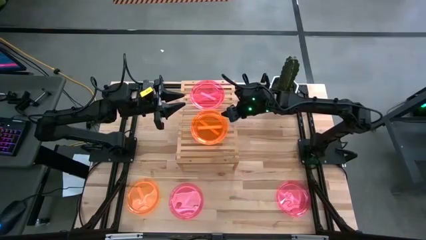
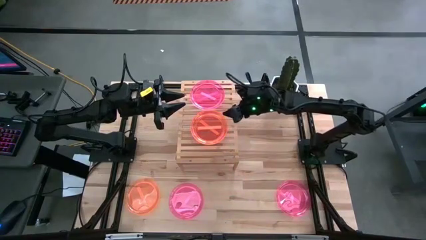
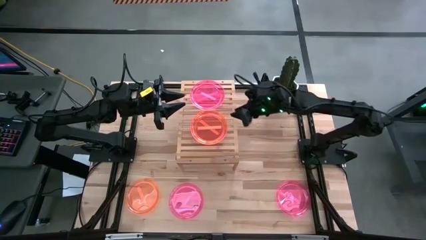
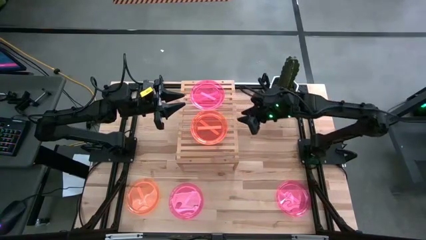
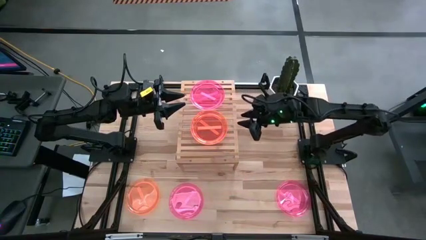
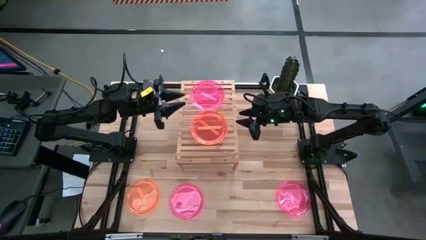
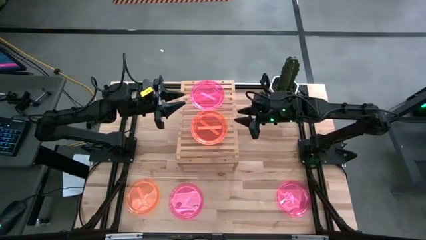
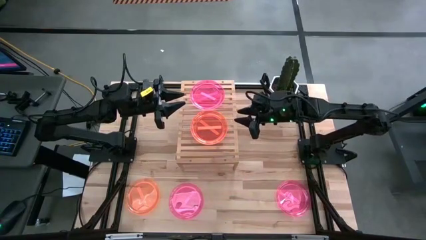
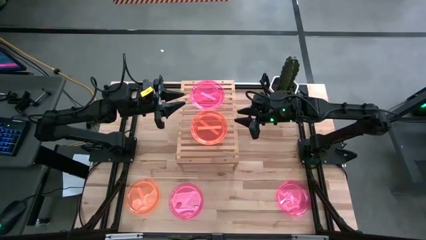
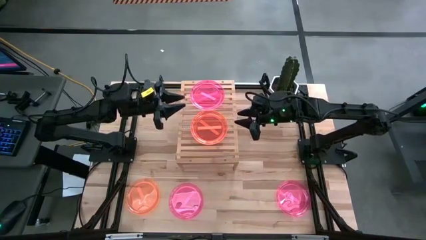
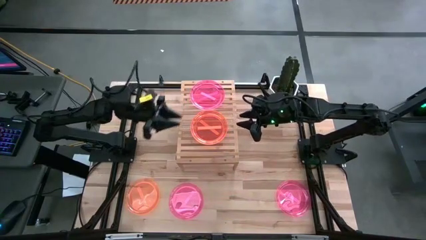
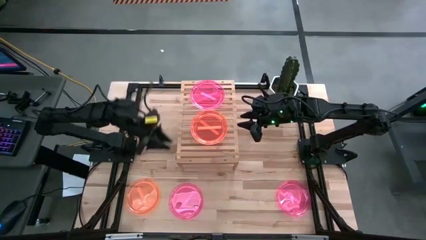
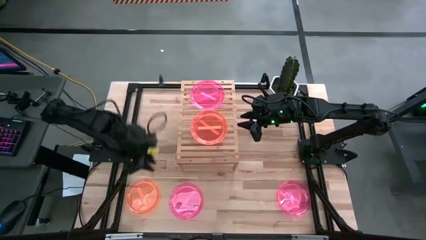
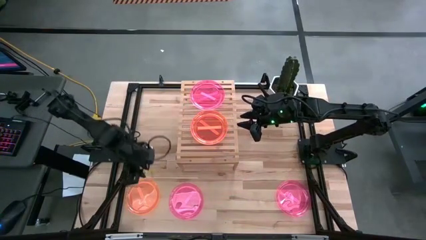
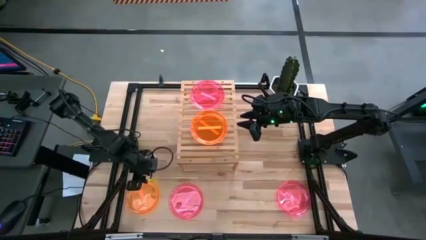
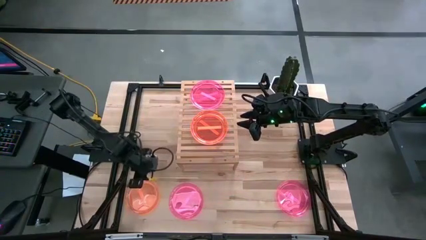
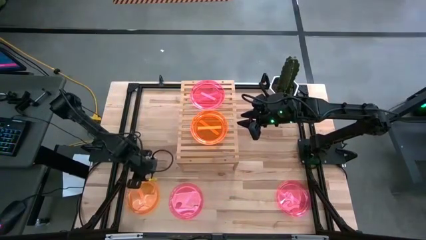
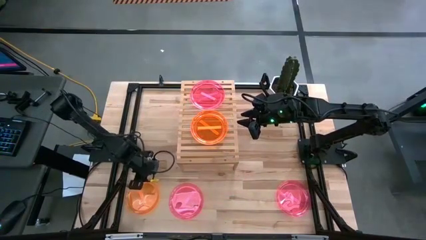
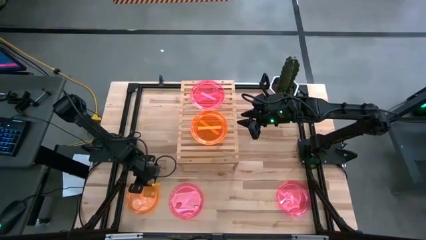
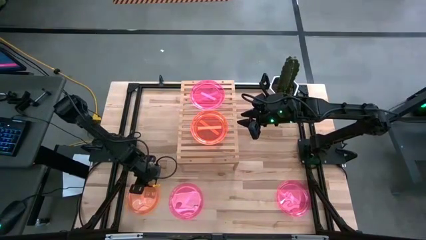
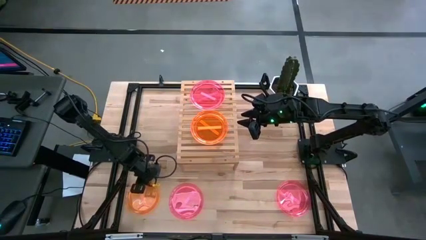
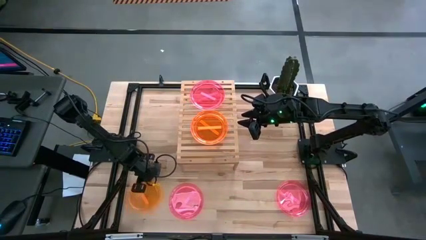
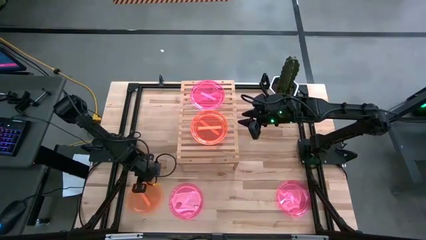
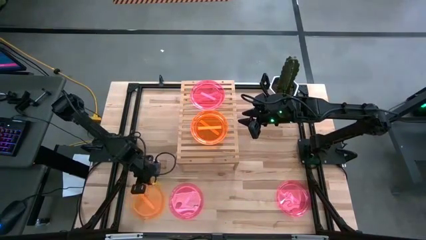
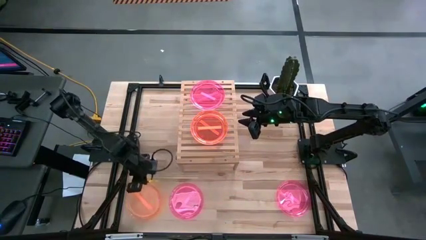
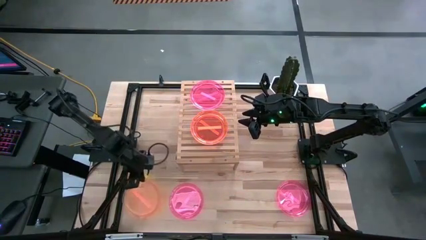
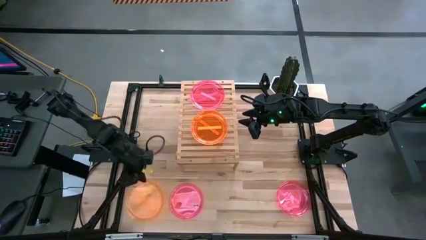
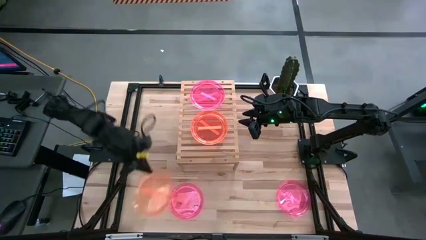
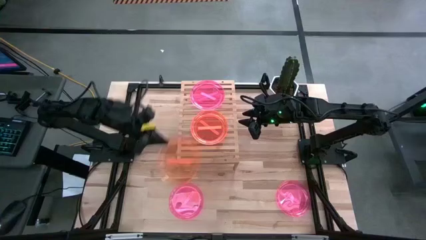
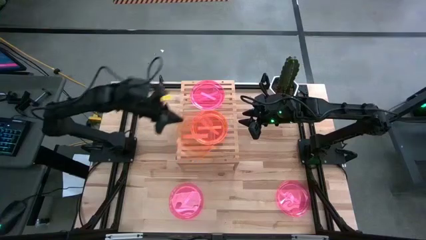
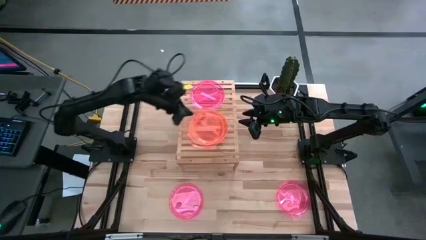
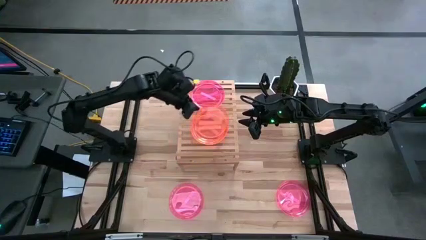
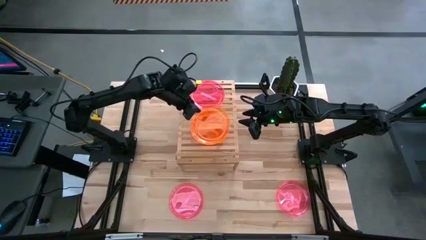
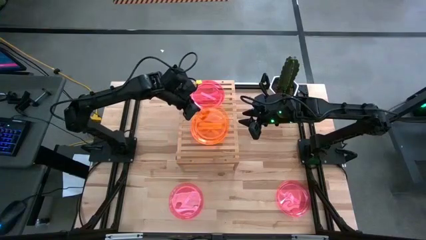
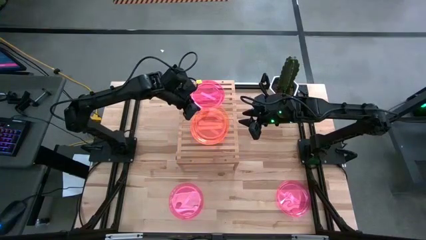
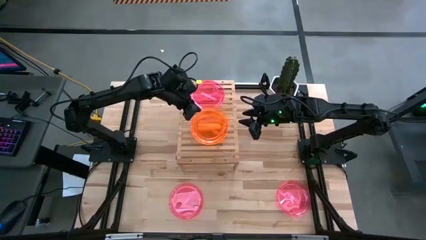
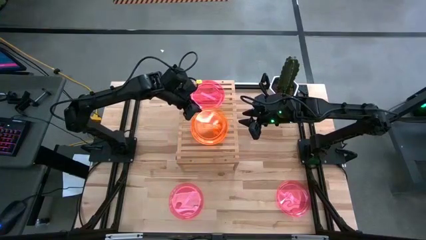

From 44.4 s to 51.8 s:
Task: Place and stack plates onto a shelf
Stack the orange plate on top of the other orange plate on the shelf

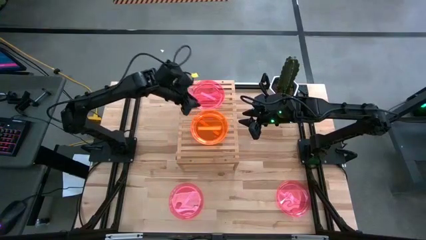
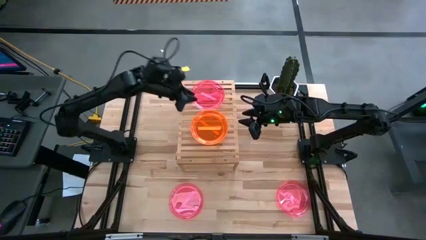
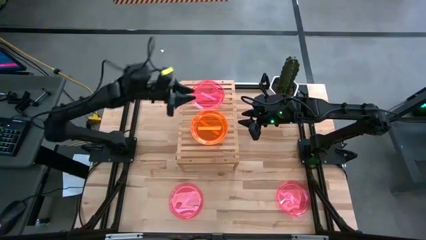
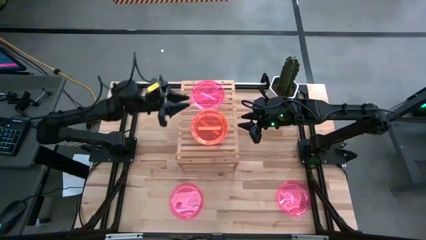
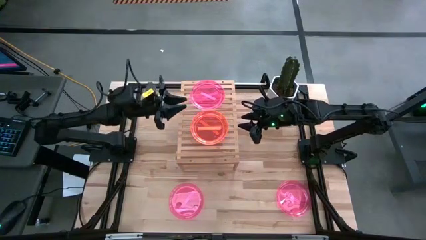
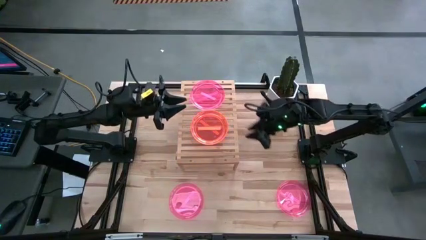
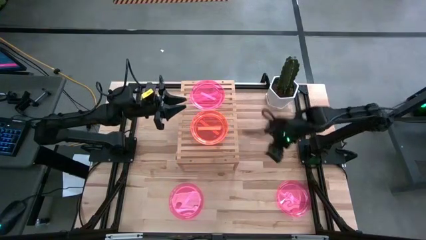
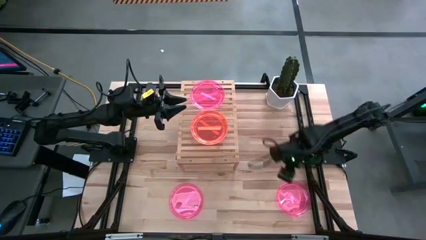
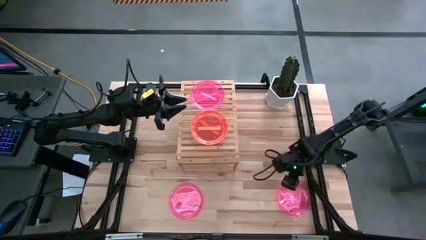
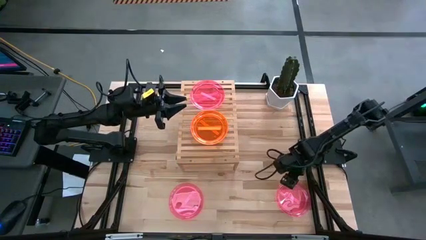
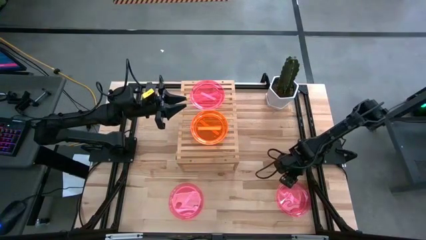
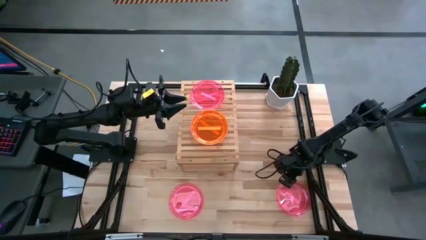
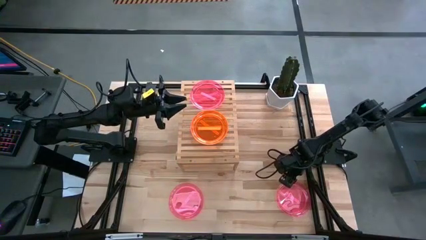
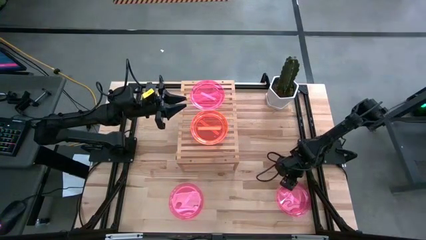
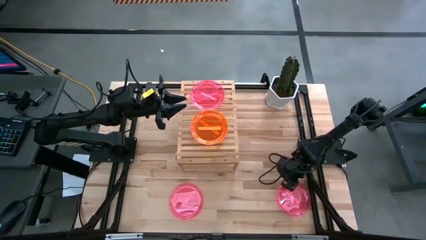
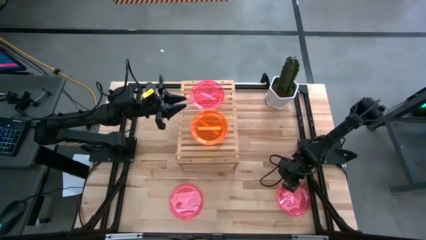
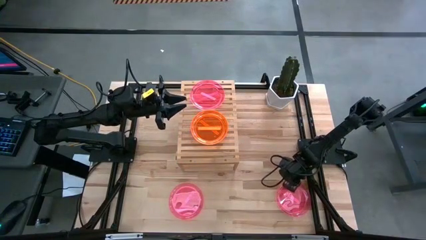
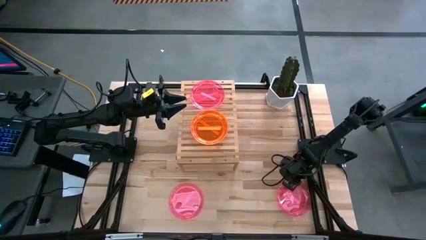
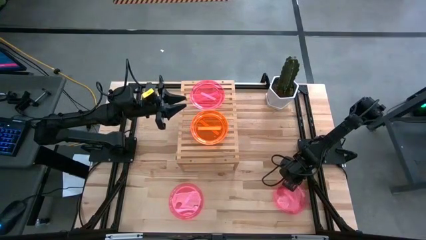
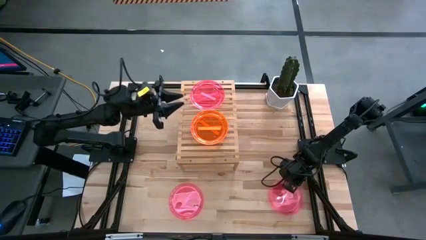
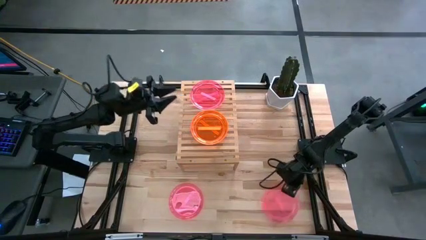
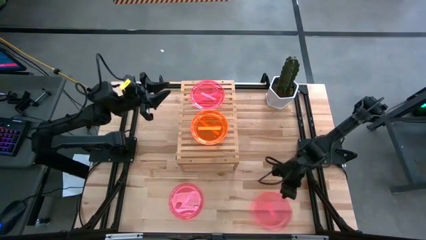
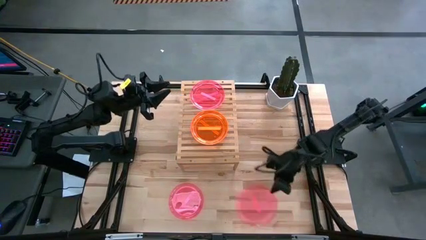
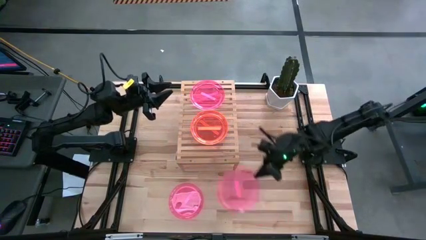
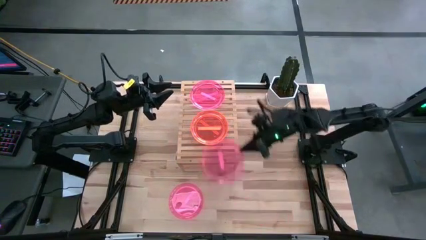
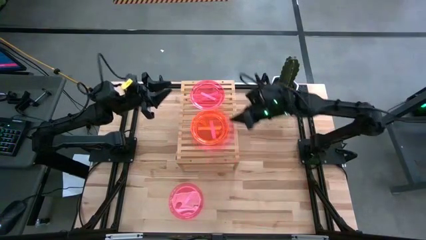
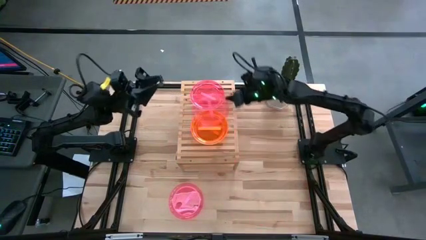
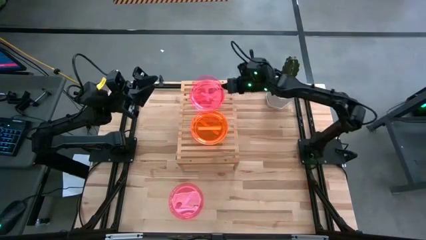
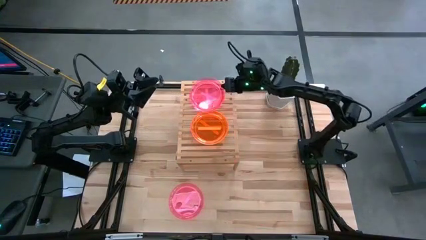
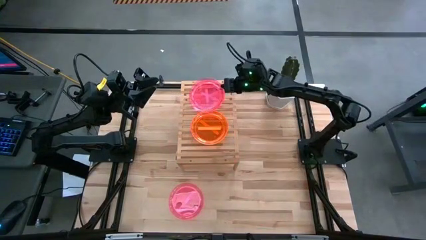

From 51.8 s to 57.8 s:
Stack the pink plate on top of the other pink plate on the shelf

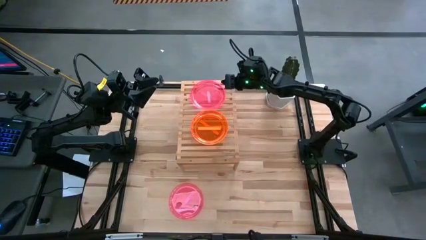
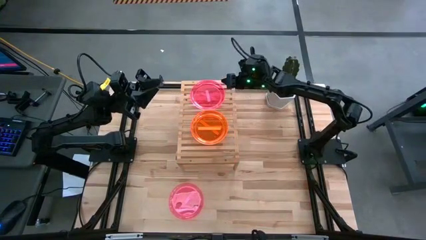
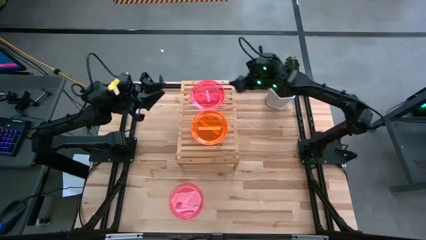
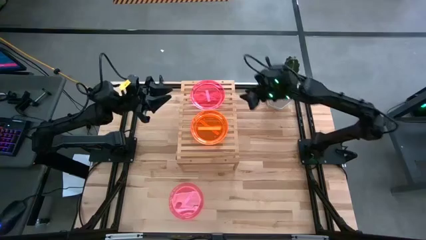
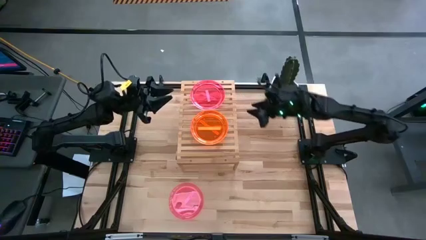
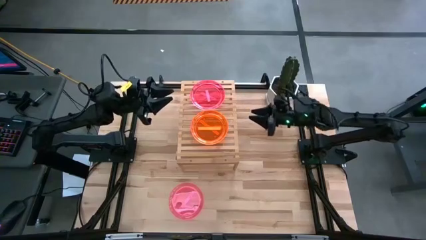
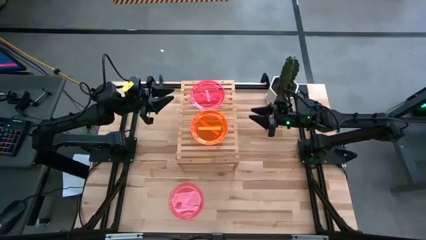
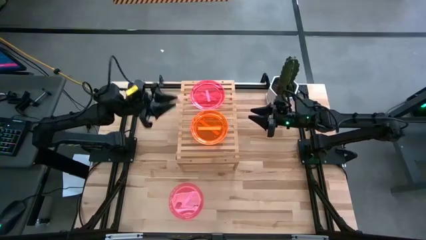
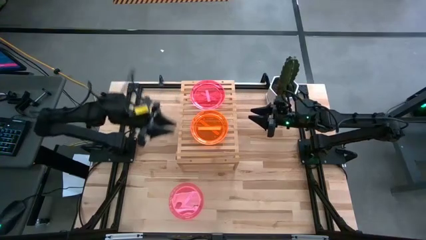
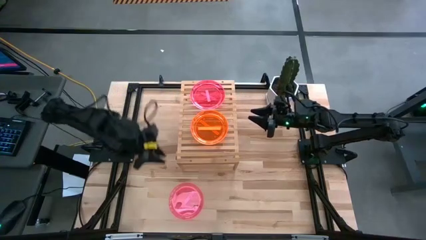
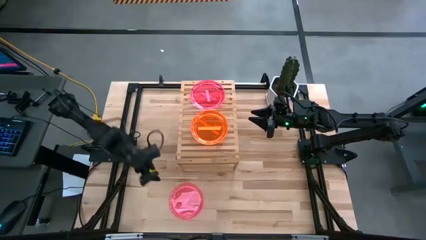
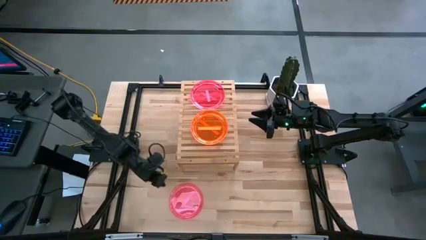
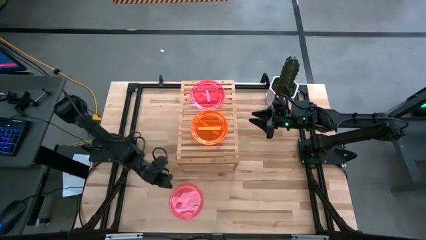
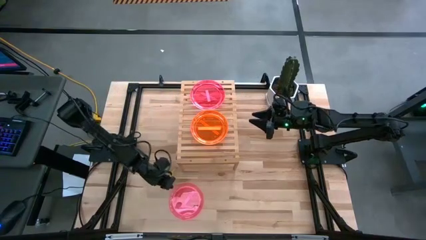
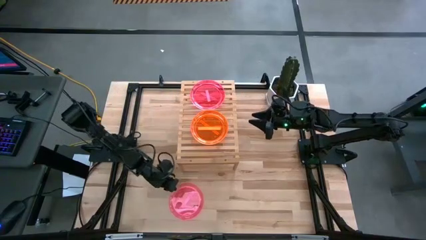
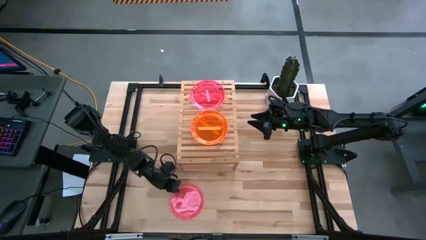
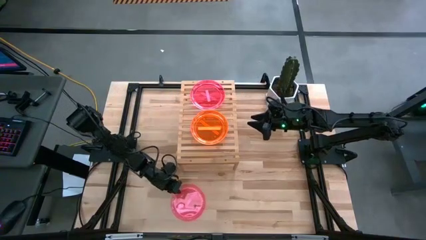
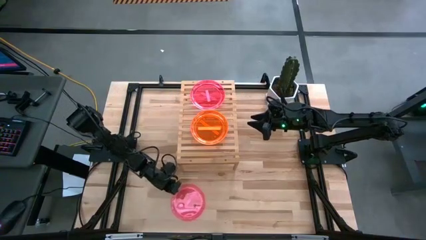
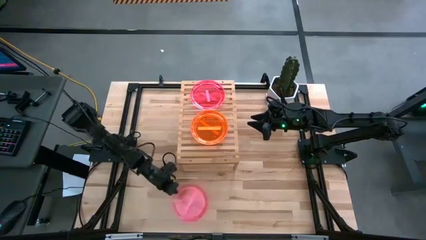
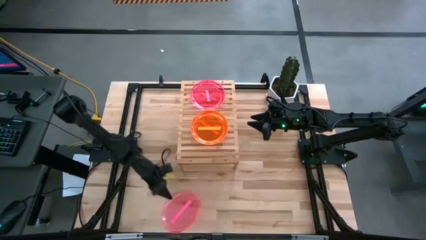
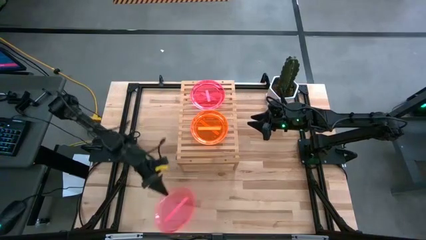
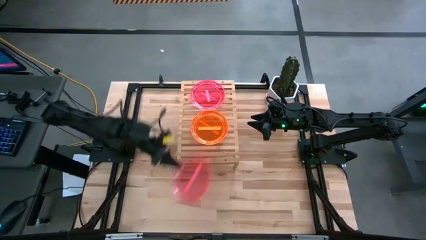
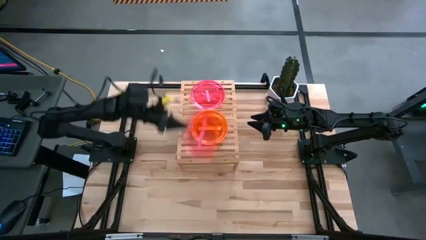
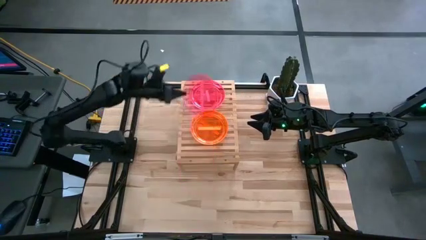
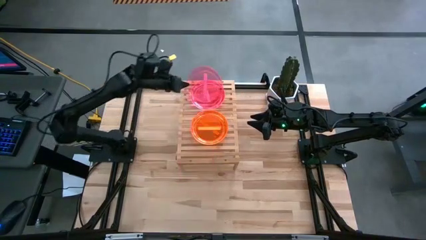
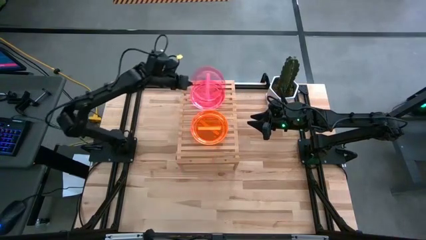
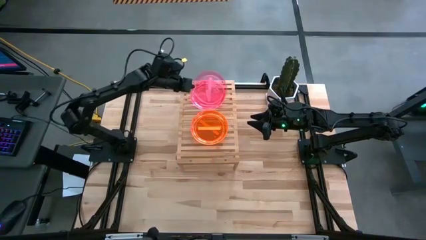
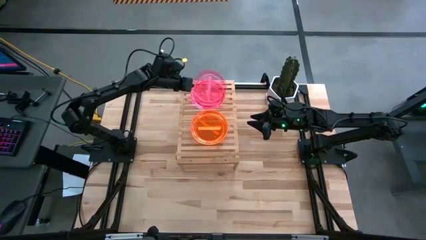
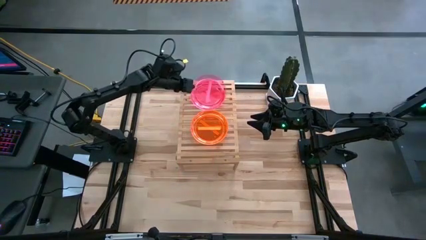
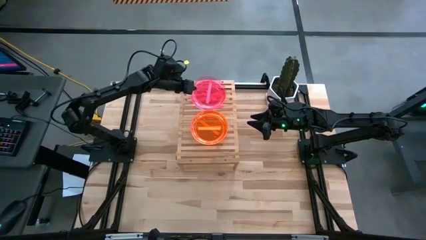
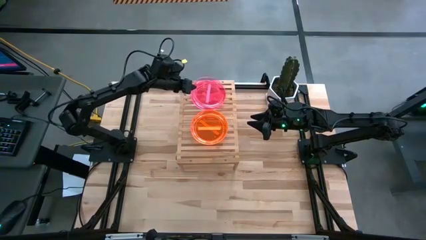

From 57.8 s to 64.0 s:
Stack the pink plate on top of the other pink plate on the shelf
